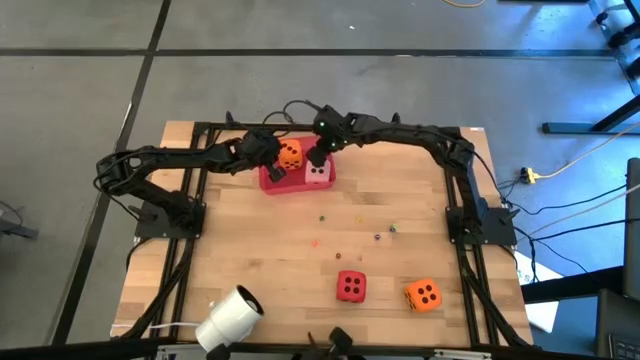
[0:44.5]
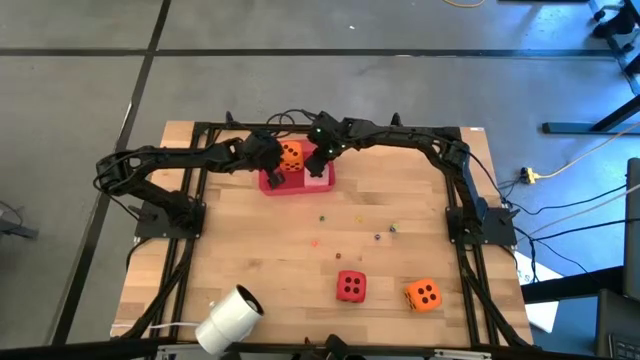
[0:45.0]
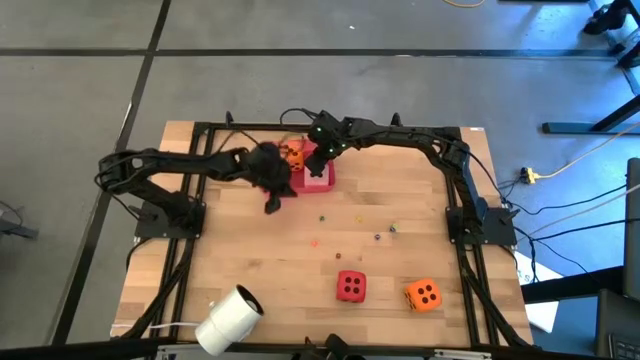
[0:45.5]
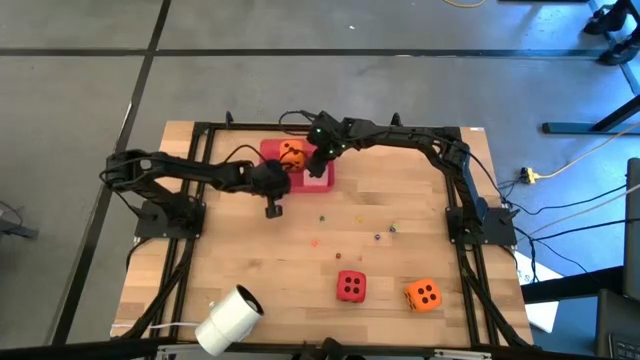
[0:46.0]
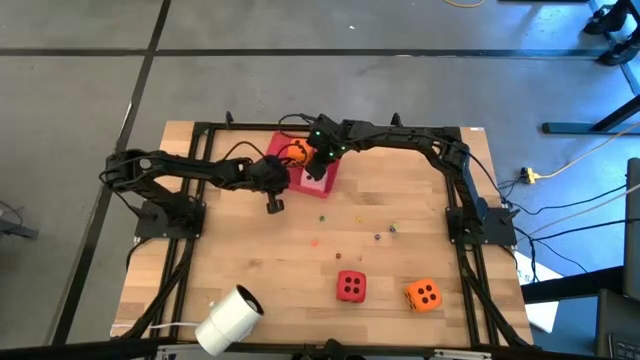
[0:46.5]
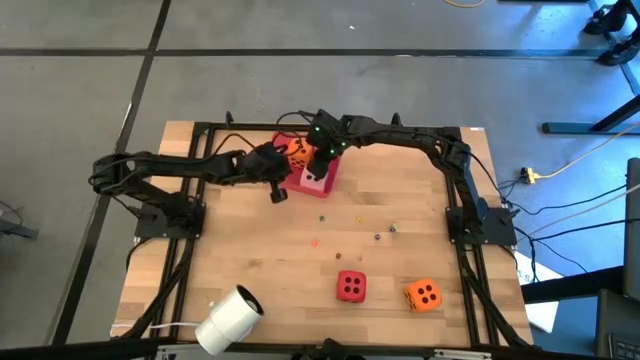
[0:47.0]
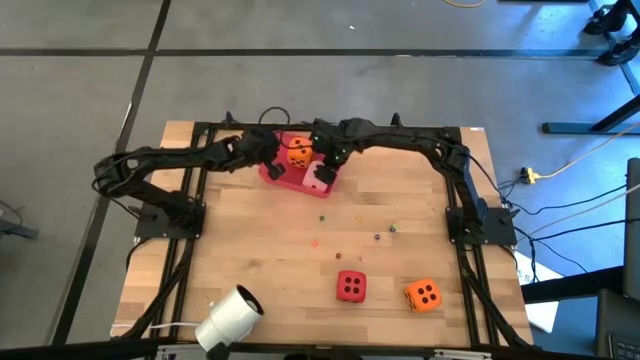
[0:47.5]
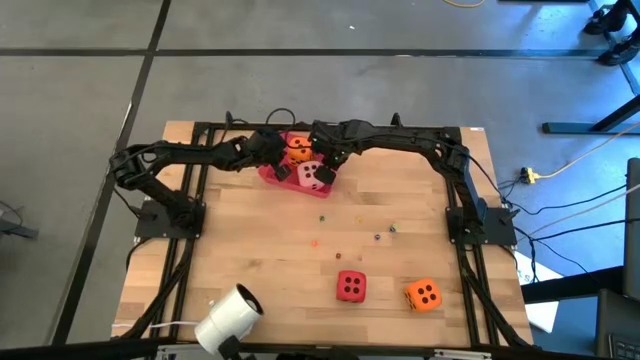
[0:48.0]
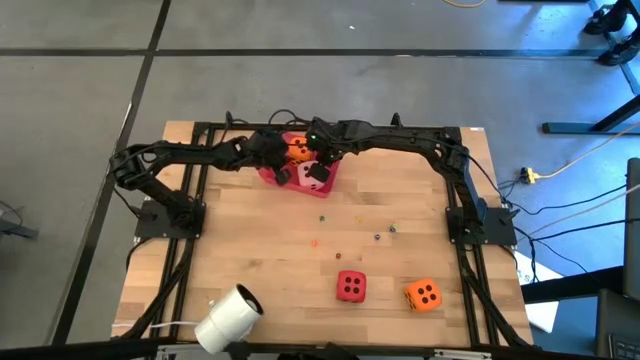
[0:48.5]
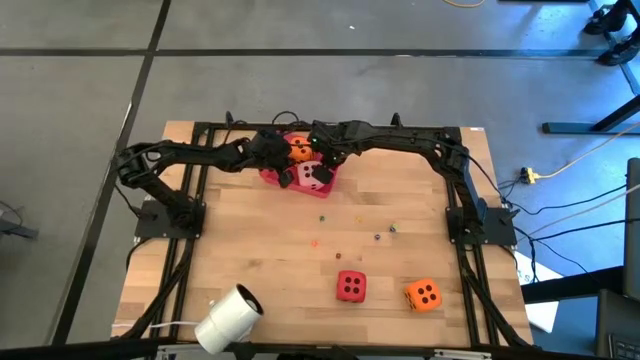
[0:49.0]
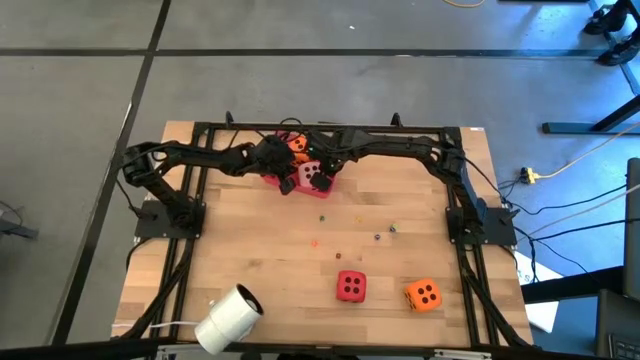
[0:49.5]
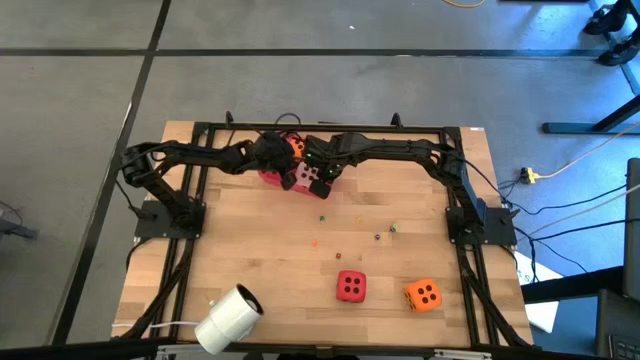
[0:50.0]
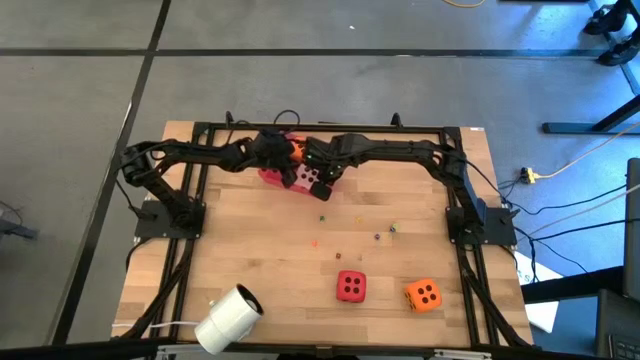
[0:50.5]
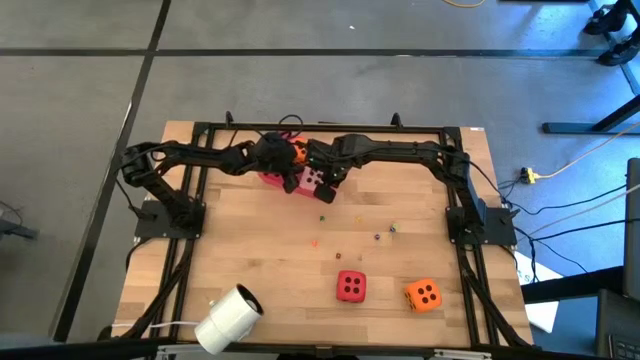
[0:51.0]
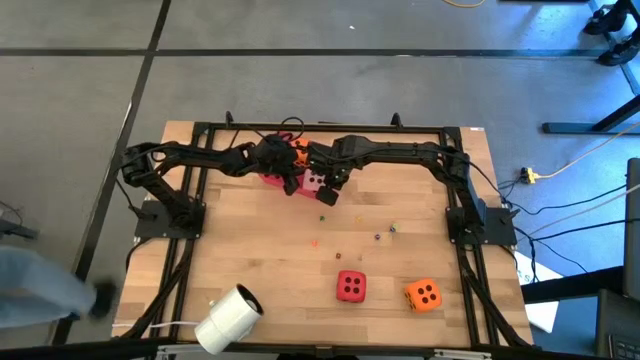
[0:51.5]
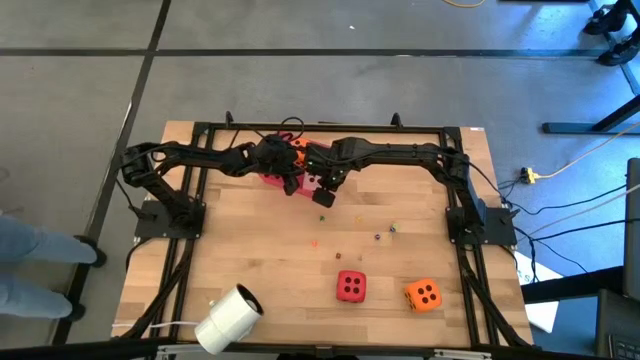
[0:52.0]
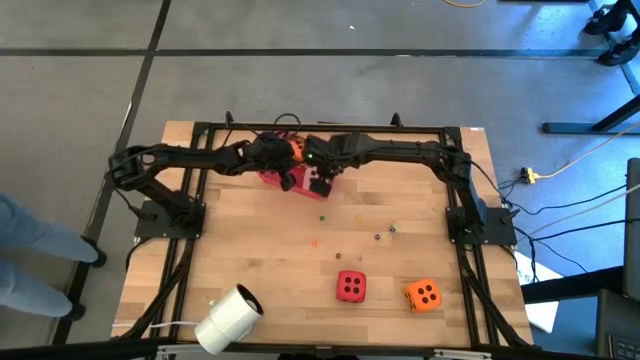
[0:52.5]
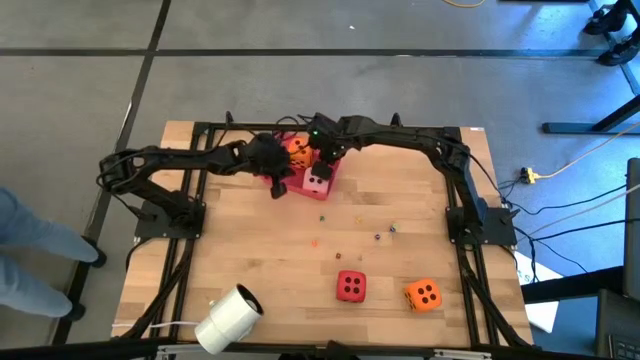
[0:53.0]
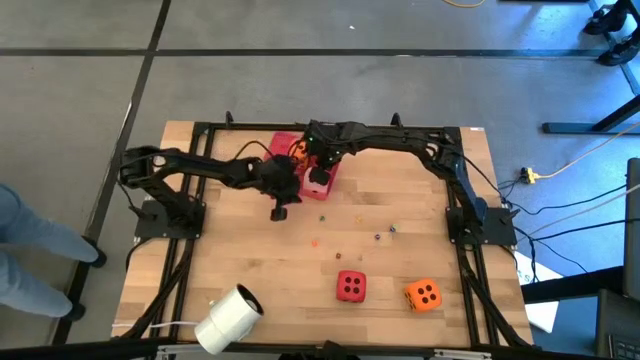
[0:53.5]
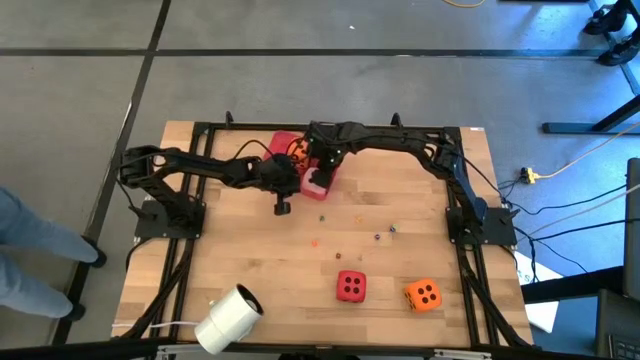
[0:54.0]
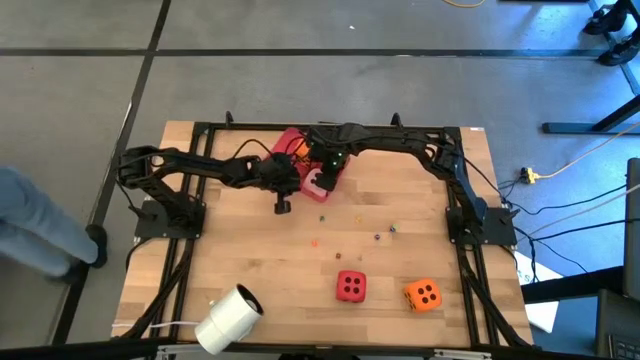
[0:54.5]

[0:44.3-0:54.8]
Task: Pick & Place Dice
Adjust the large pink die in the red bin

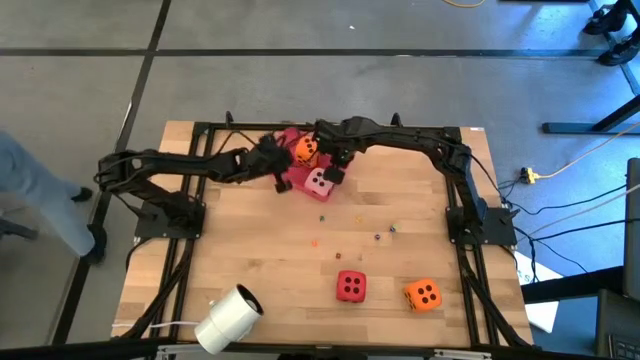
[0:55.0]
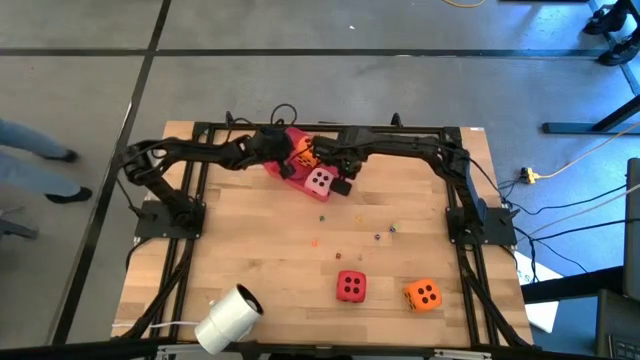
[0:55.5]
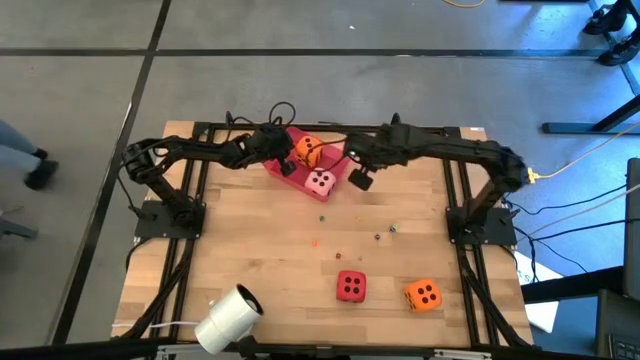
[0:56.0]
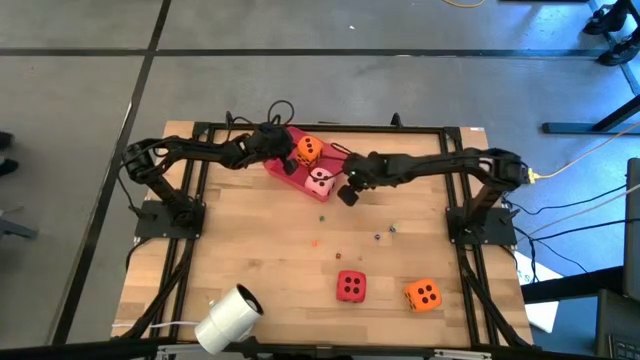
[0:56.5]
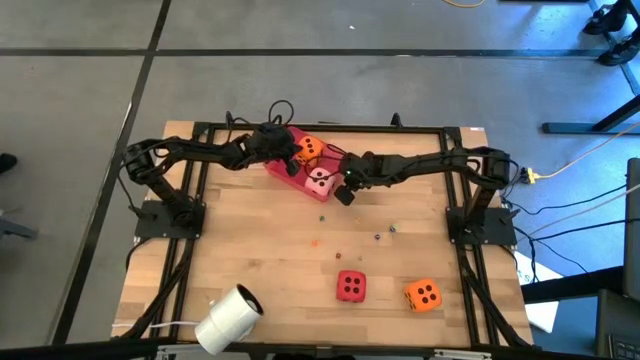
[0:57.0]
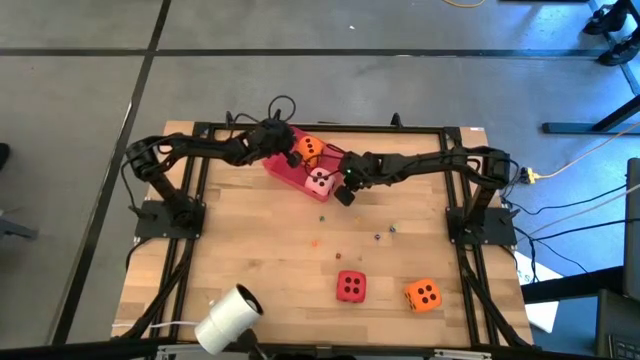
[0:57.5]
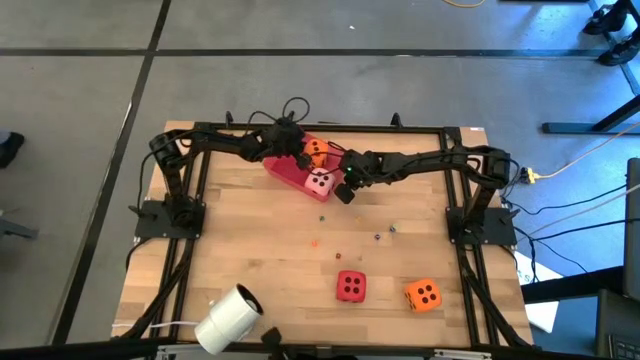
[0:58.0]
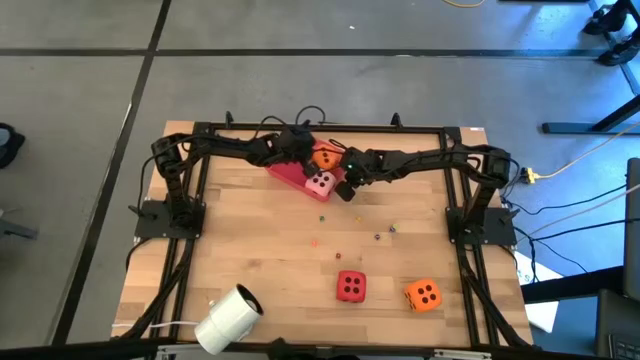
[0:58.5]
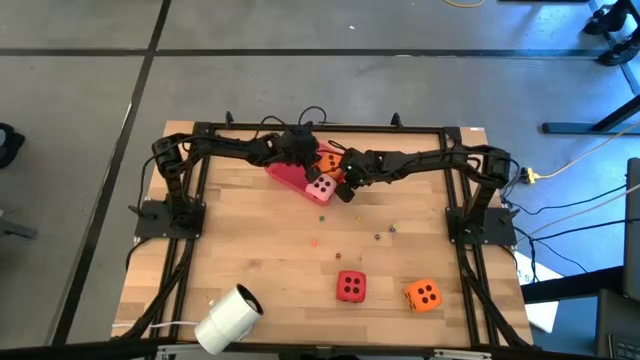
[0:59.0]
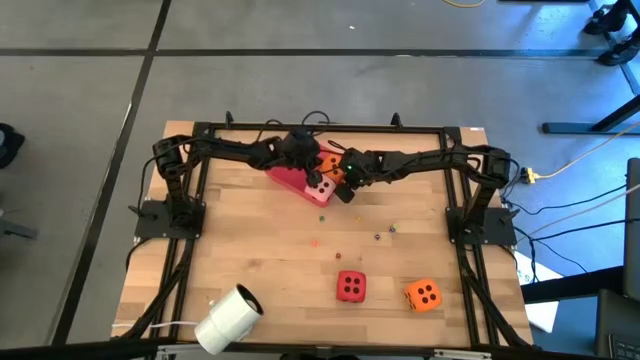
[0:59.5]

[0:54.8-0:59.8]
Adjust the large orange die in the red bin

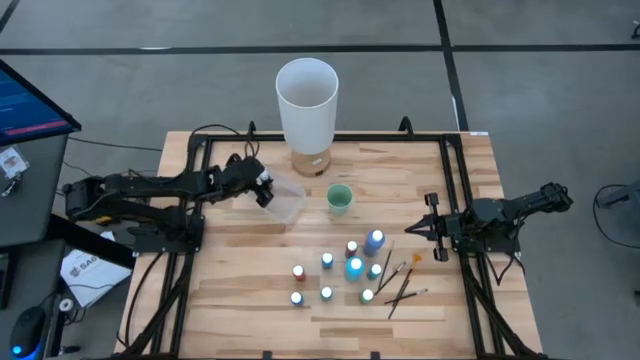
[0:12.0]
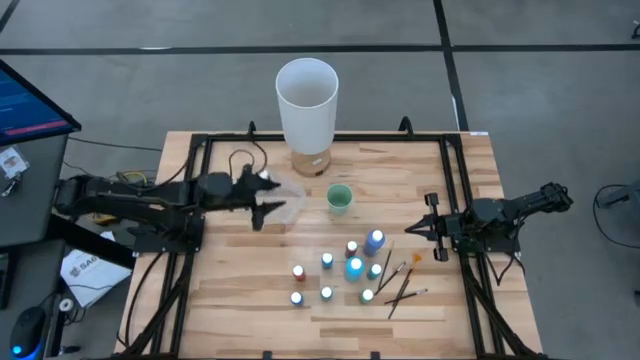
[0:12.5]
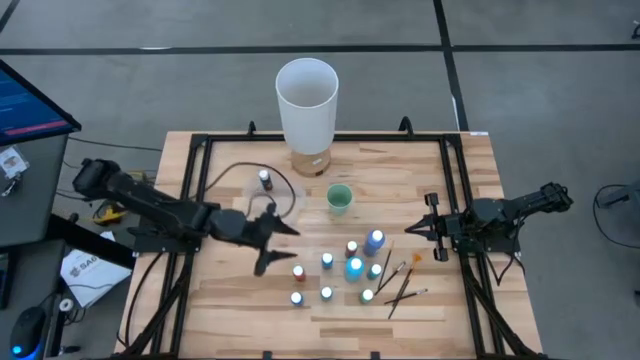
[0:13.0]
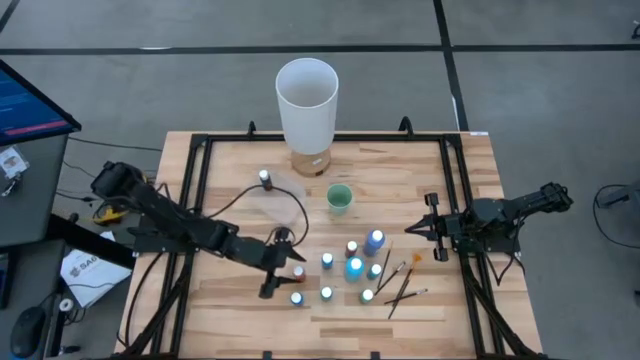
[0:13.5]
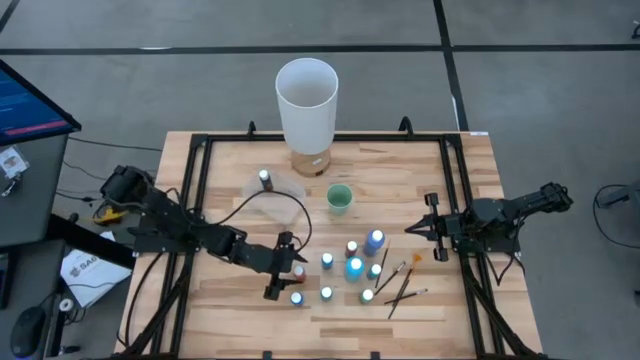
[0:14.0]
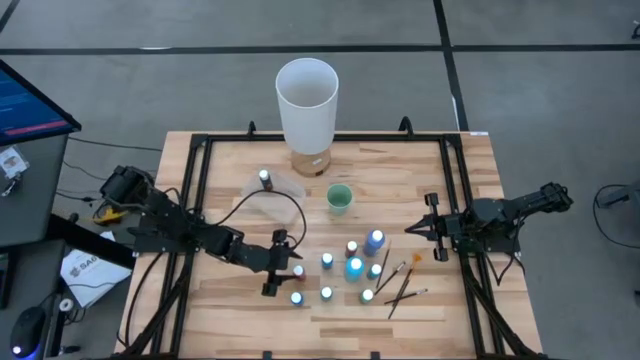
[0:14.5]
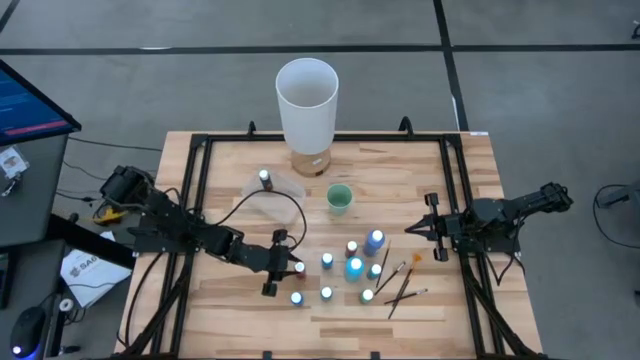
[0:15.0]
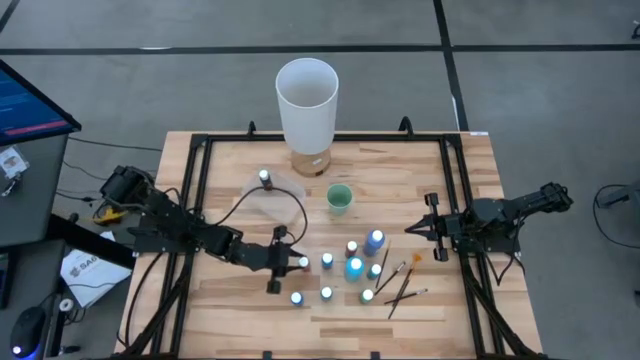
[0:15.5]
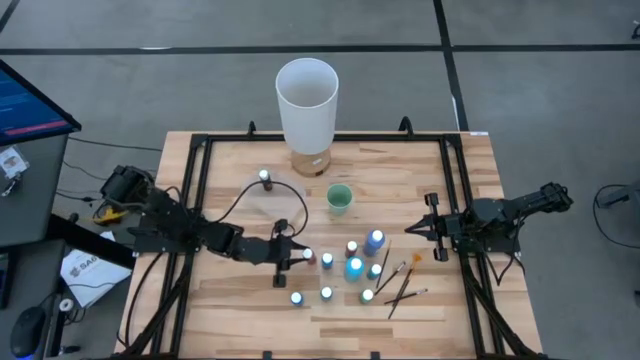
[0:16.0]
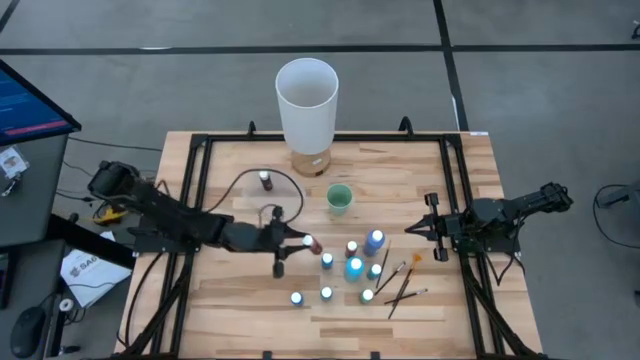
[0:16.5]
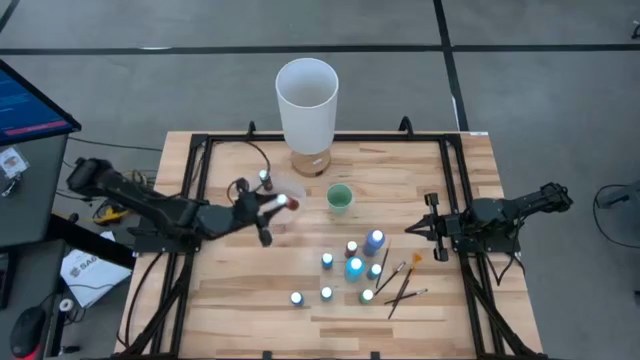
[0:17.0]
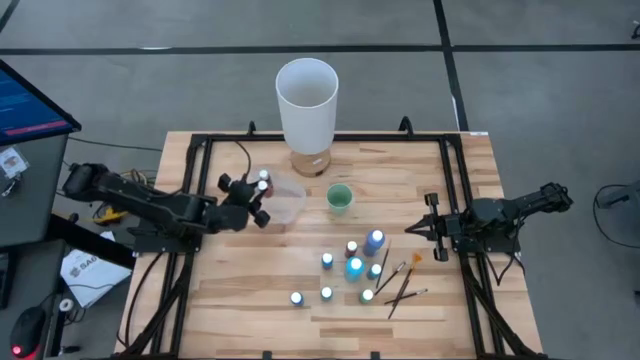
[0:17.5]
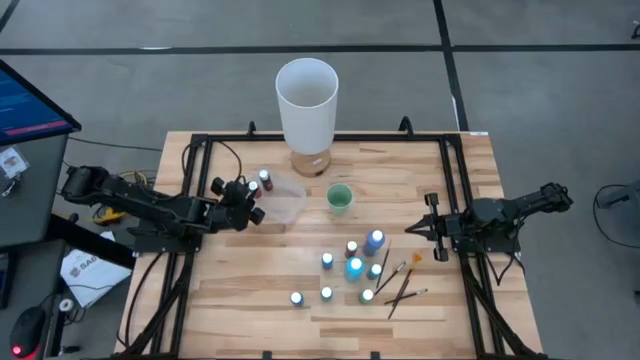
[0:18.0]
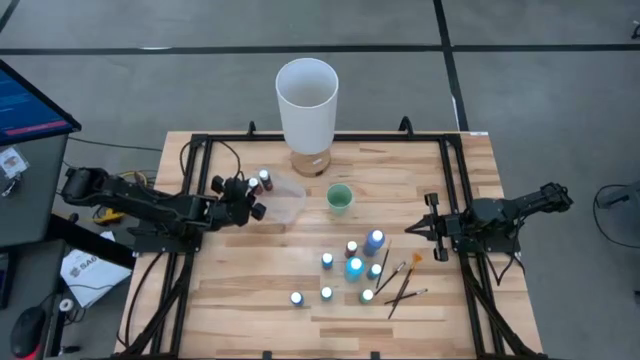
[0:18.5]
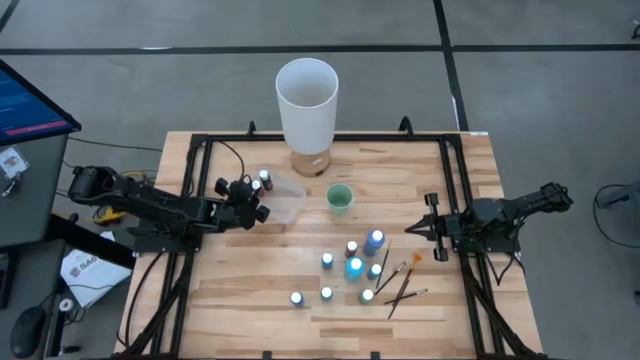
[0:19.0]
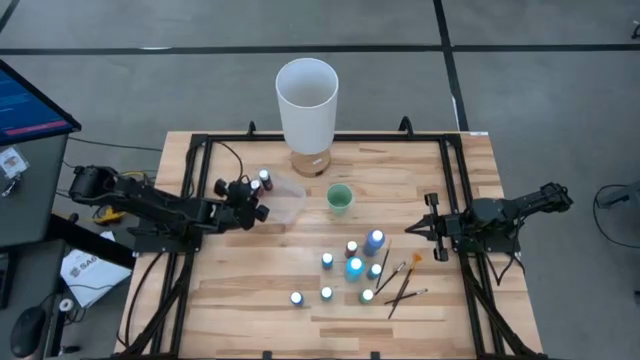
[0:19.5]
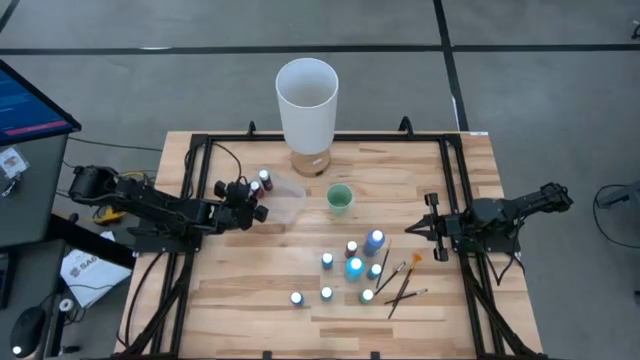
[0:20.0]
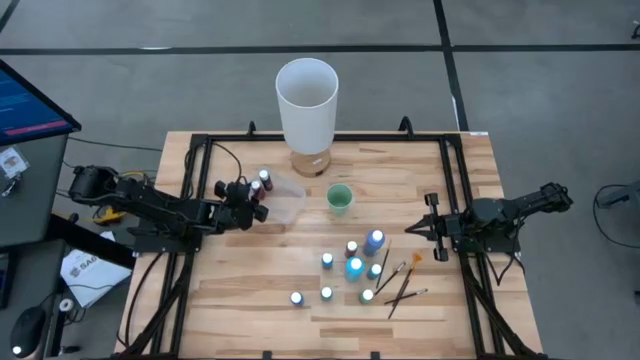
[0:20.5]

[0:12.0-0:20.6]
Task: Pick & Place Paint Supplies
Put the left red paint bottle into the transparent bin
